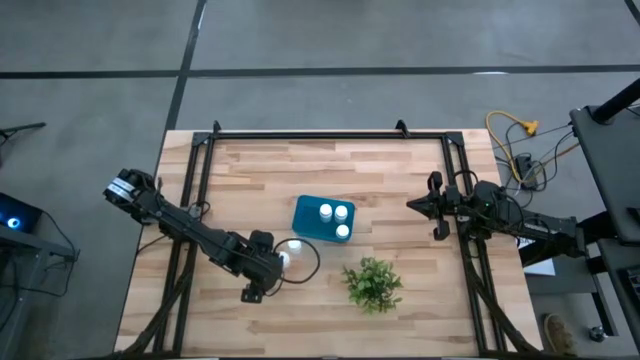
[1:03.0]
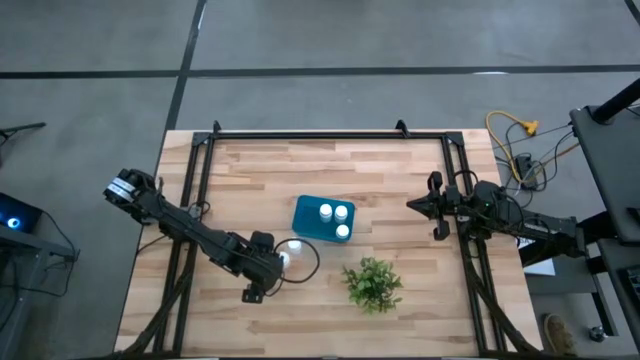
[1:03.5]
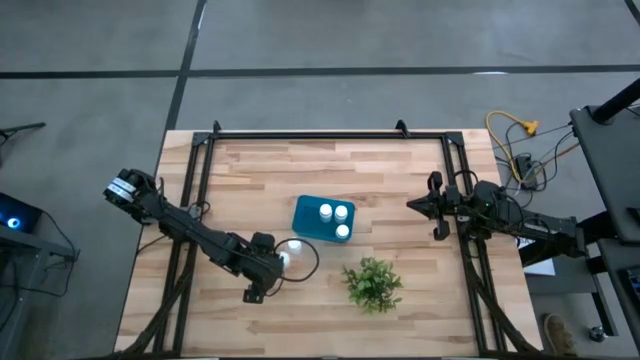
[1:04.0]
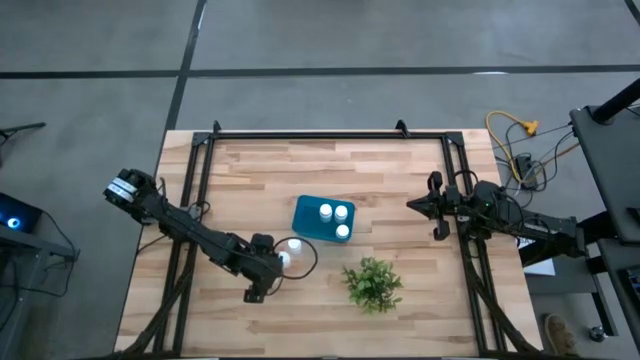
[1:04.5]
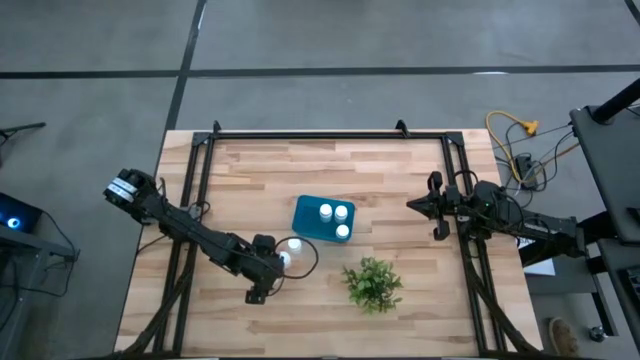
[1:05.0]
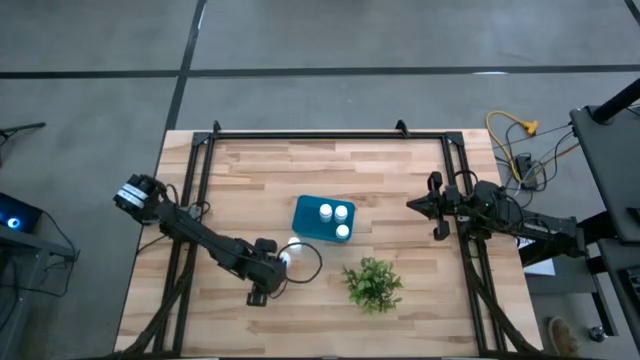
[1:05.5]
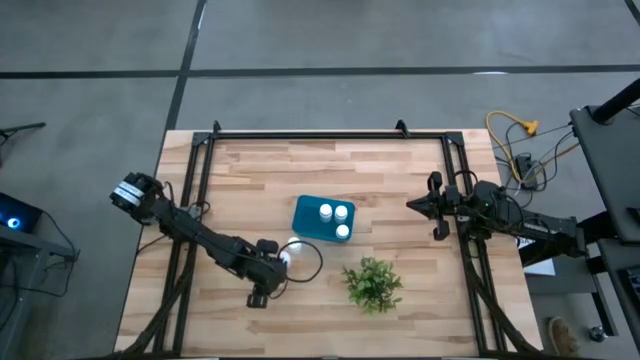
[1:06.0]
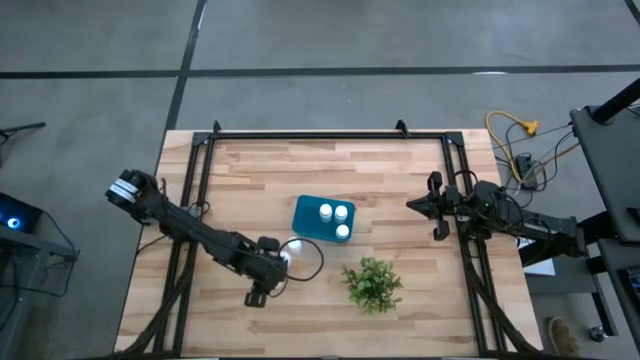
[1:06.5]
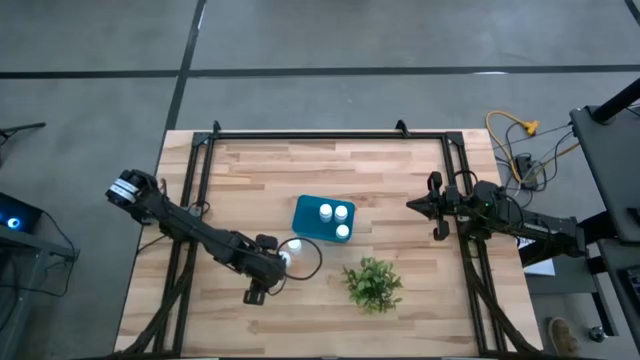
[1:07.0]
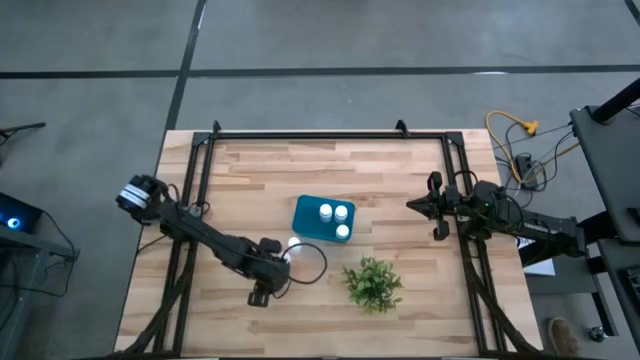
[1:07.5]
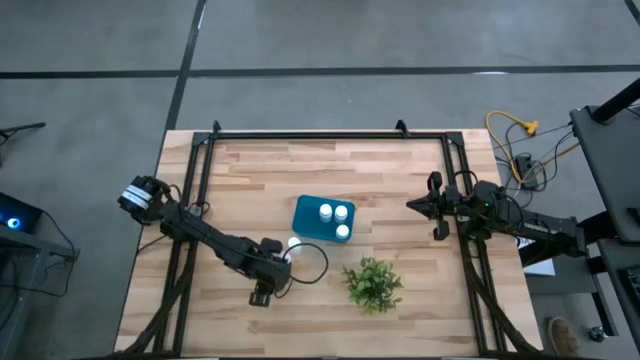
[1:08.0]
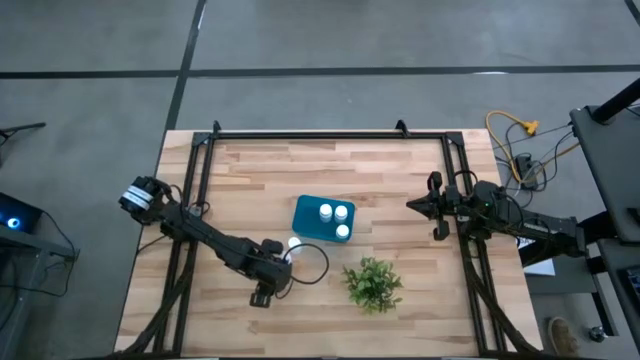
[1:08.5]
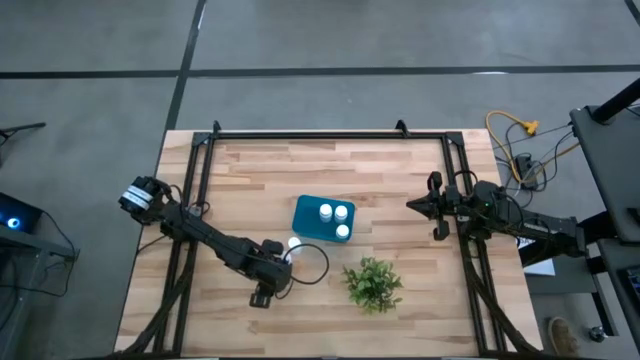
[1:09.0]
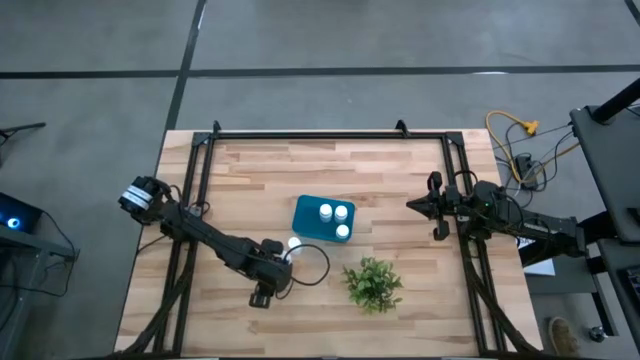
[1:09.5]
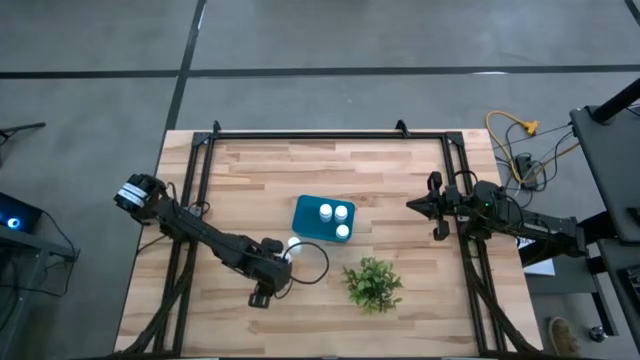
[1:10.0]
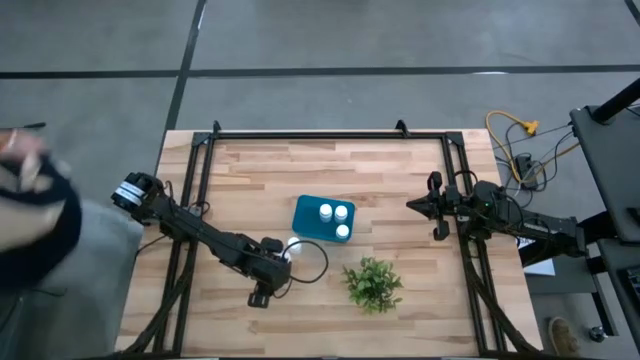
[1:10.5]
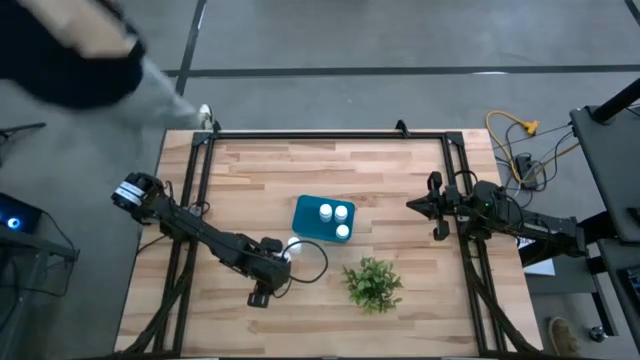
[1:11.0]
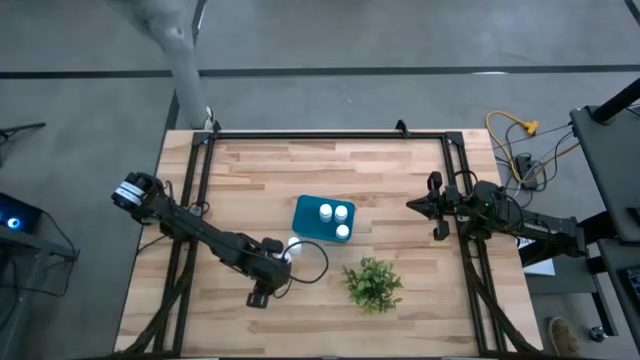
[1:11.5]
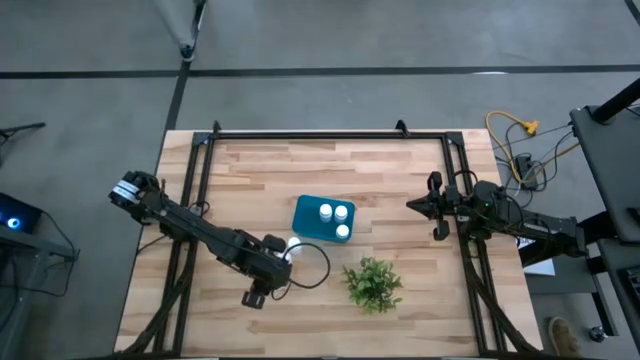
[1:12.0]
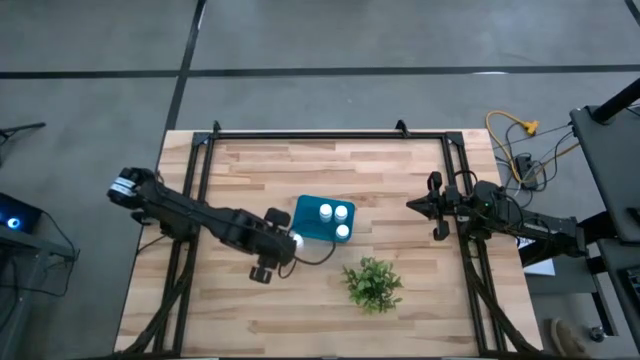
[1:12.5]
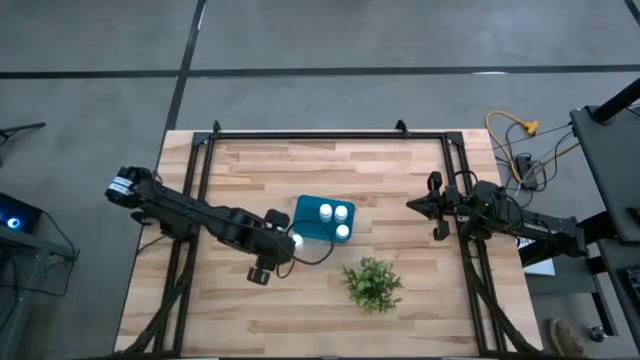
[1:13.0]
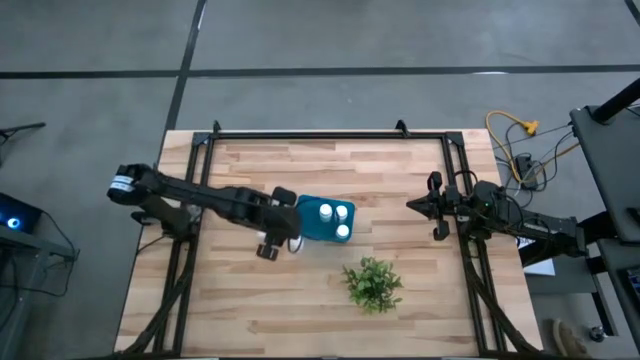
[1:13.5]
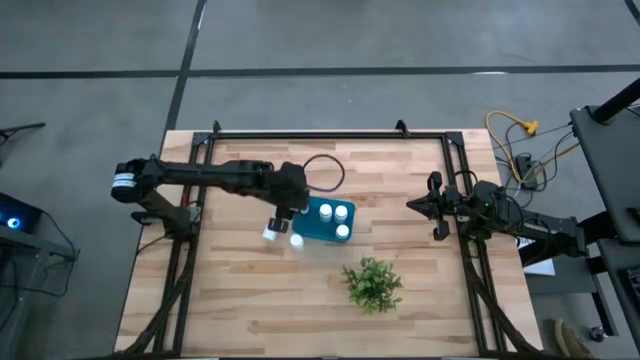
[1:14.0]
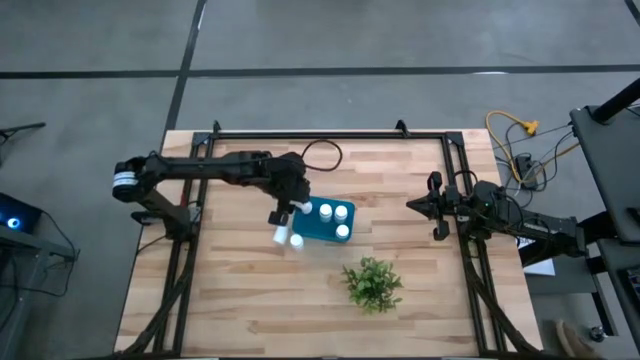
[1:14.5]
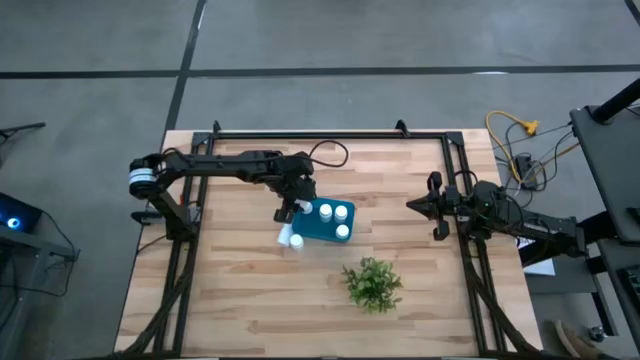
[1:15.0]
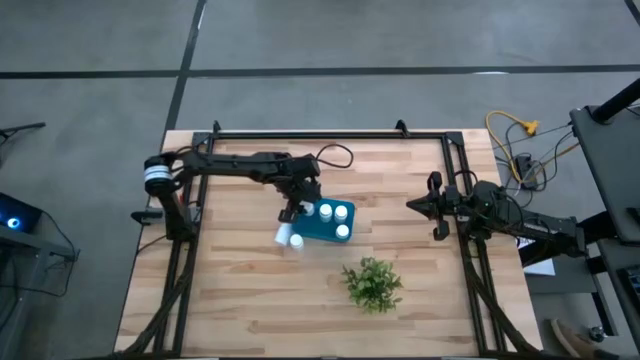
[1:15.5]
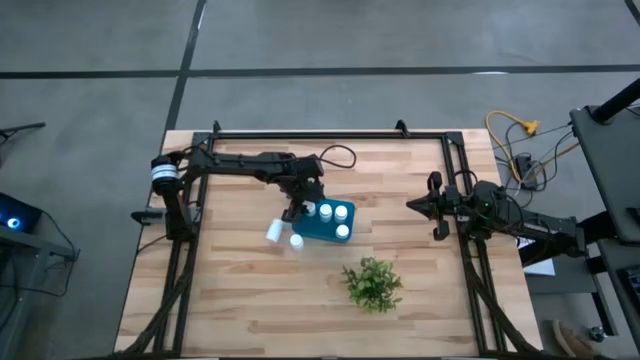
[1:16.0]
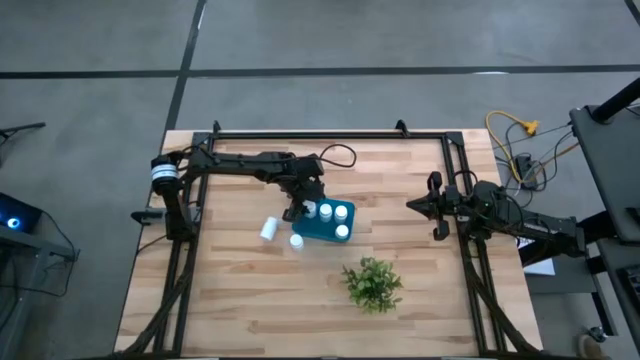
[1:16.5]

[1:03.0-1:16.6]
Task: Pick and place pill bottles into a basket
Put the white pill bottle in the blue bin

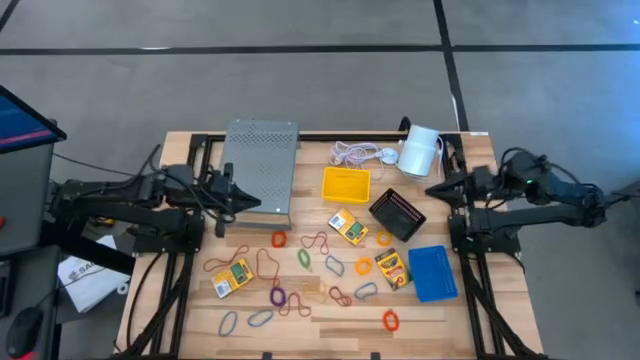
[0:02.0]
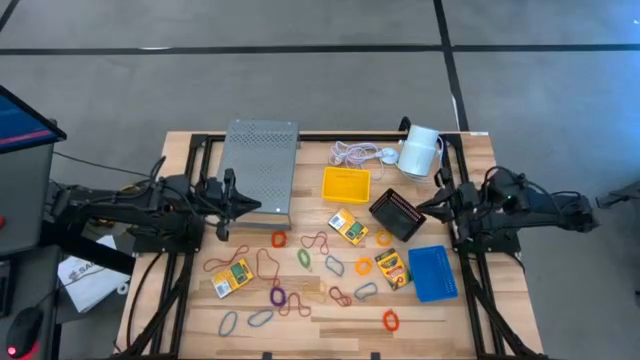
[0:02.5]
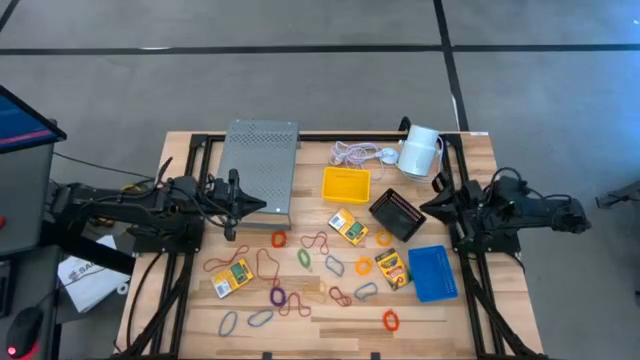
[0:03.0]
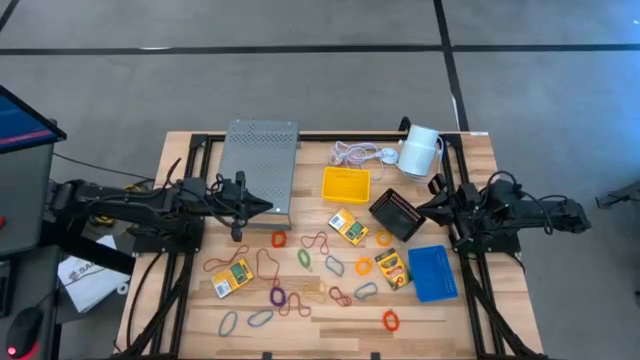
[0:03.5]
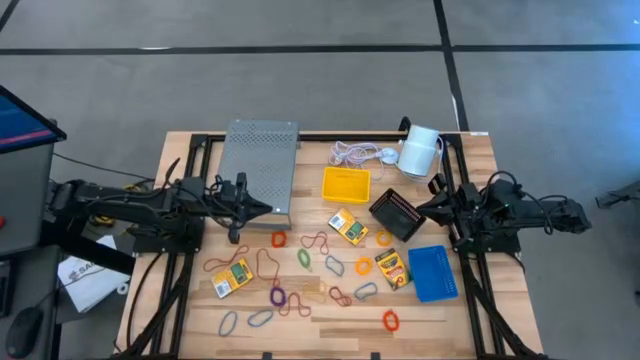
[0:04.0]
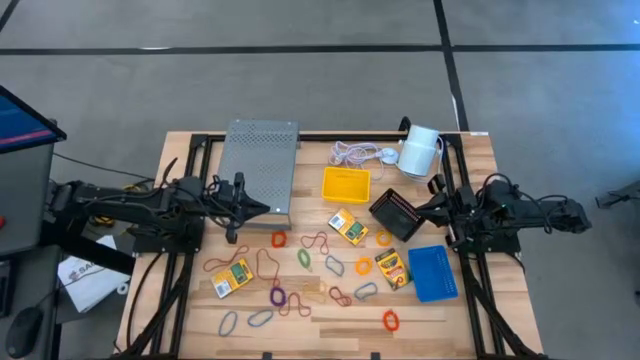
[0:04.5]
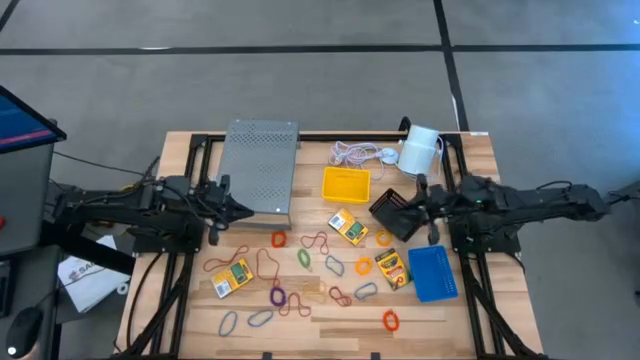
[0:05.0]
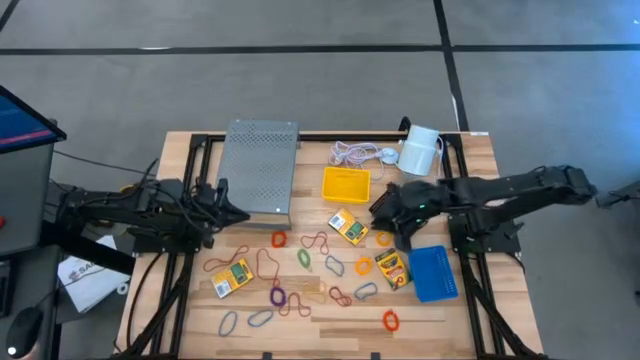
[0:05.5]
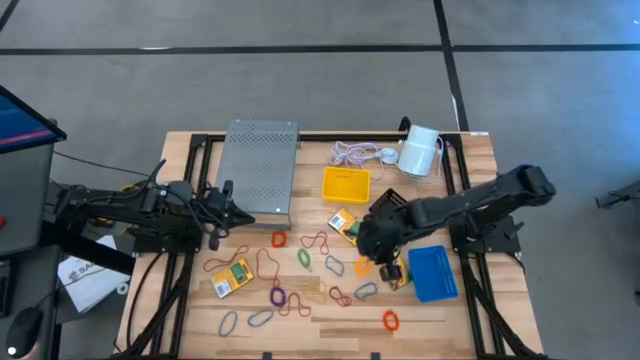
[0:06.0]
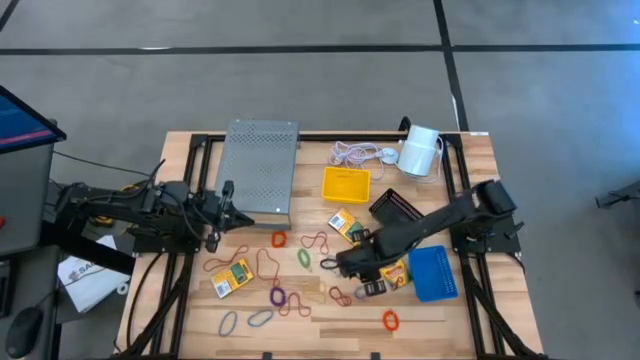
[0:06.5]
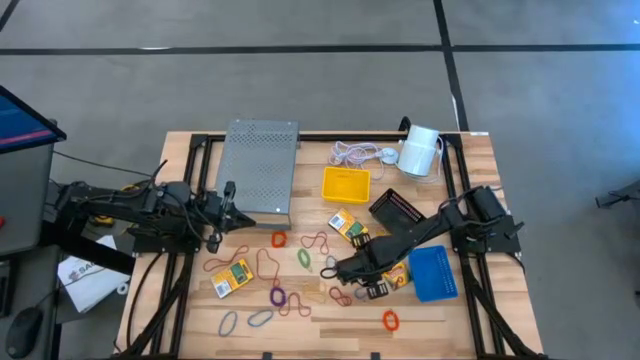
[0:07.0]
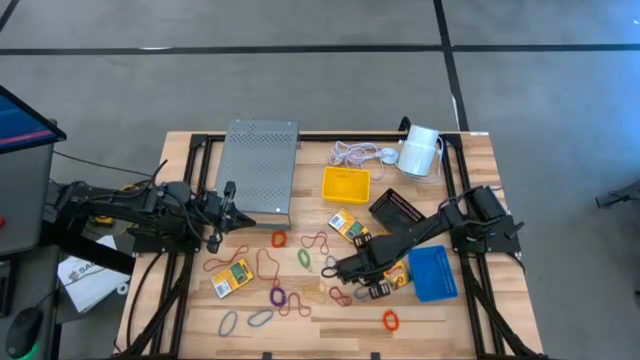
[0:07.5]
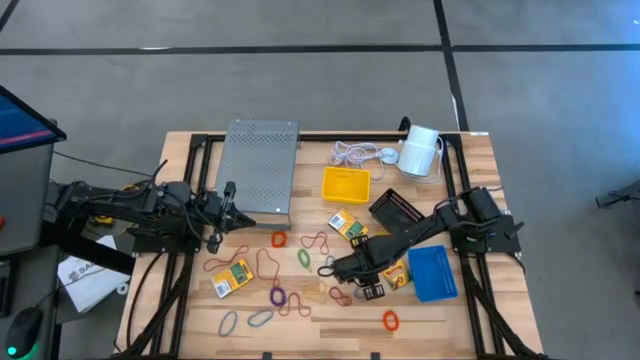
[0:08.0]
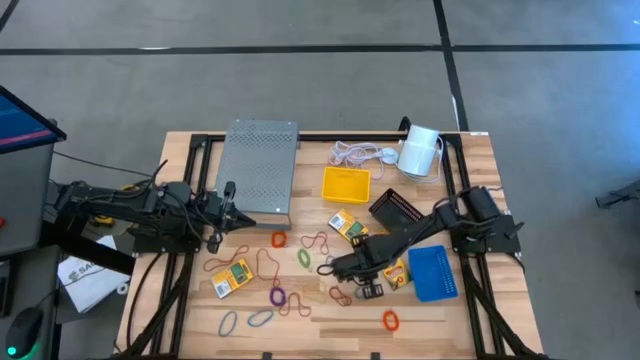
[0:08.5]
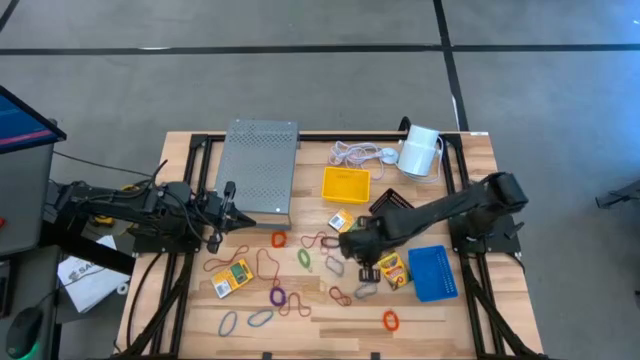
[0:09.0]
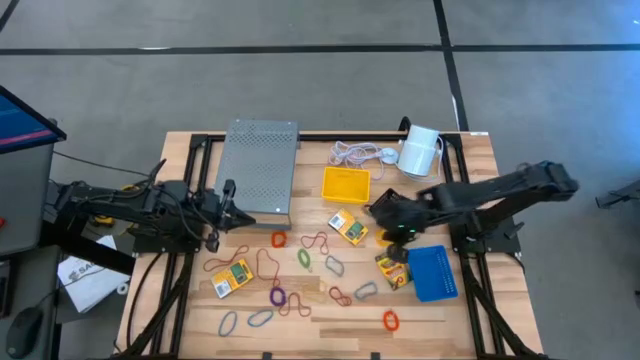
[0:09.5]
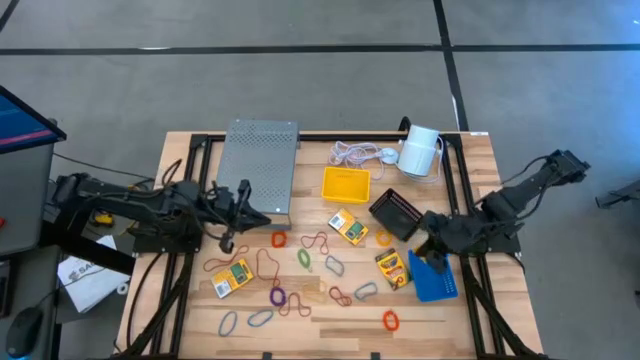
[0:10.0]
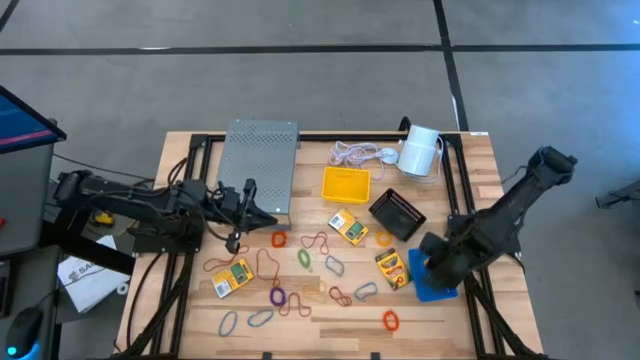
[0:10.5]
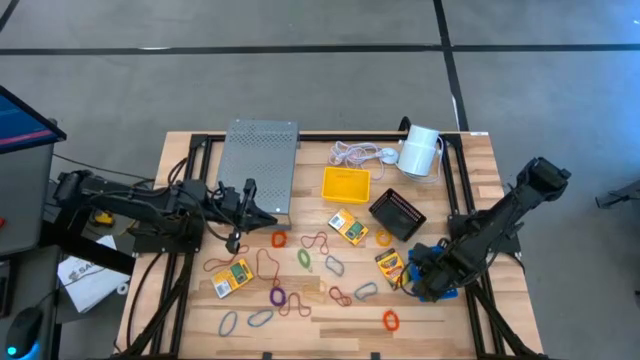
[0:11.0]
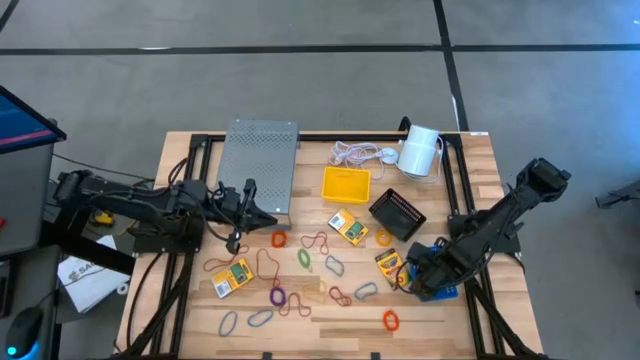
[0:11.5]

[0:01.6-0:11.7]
Task: Pick & Place Office Desk Supplies
Put the yellow spring keychain into the blue bin
